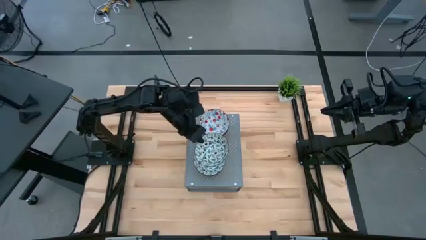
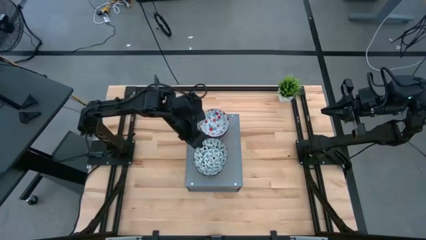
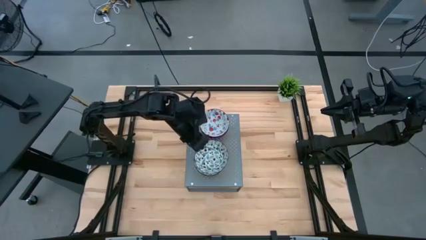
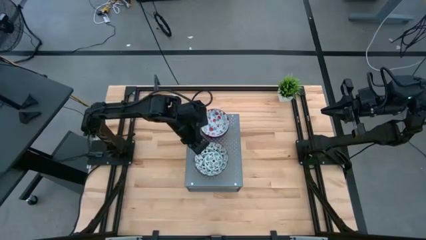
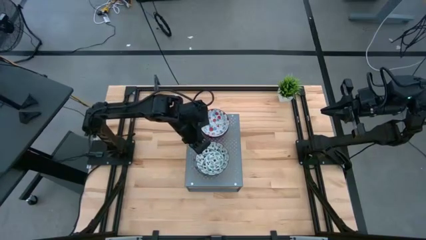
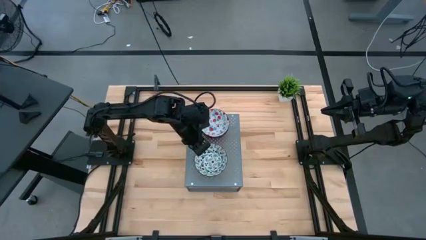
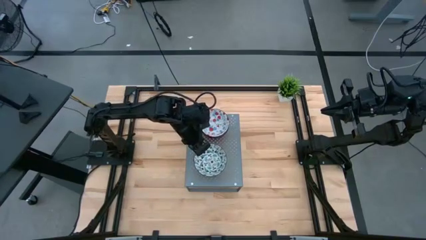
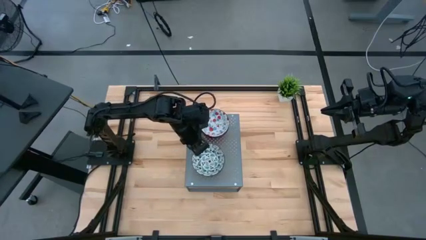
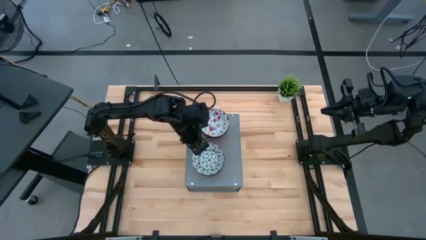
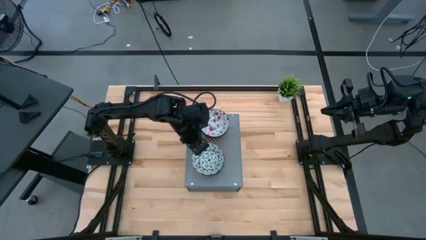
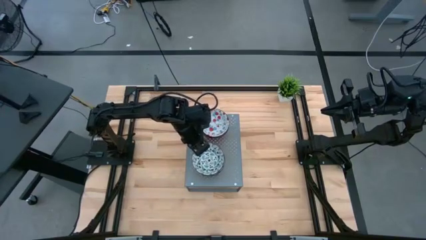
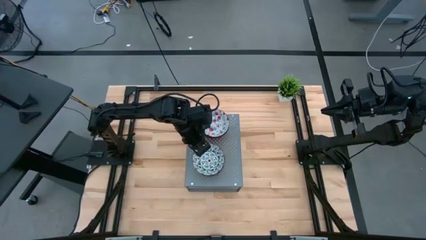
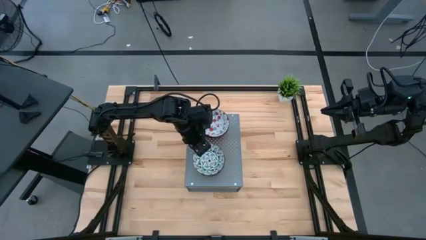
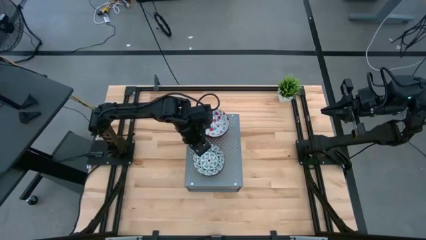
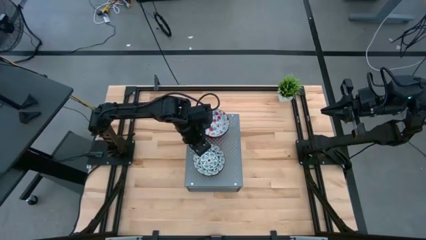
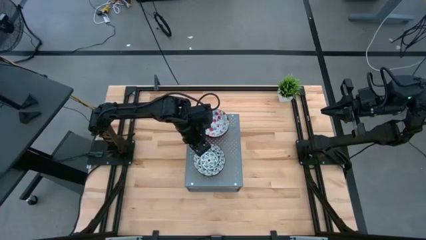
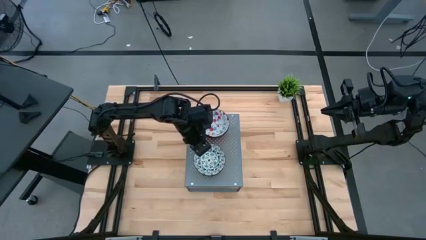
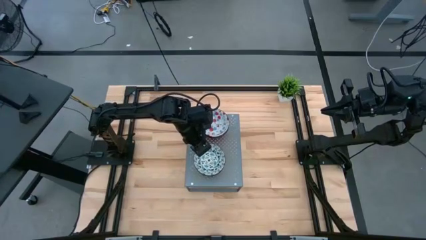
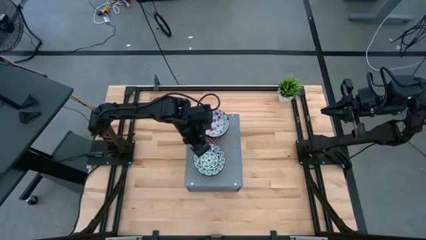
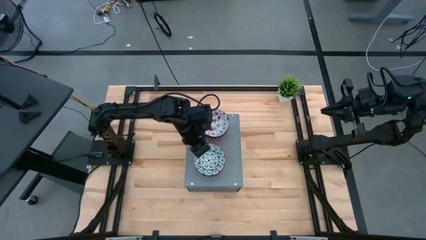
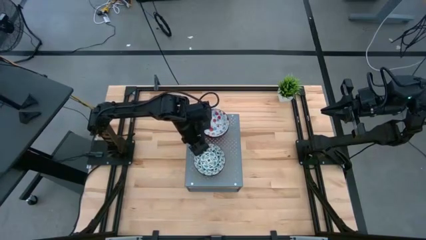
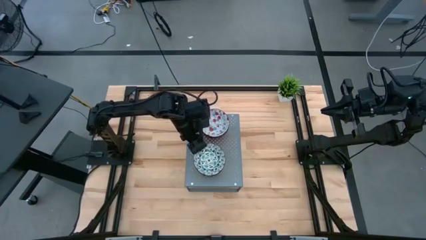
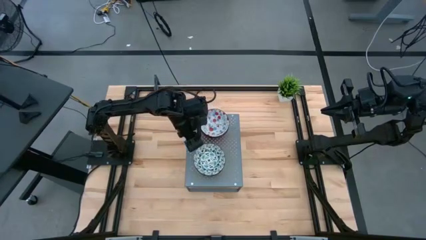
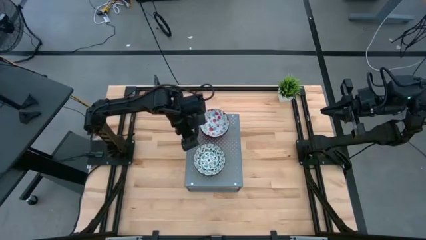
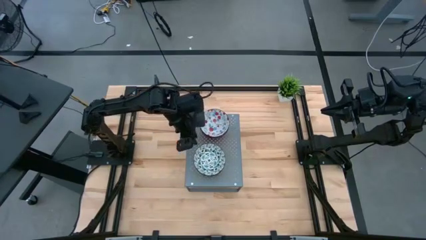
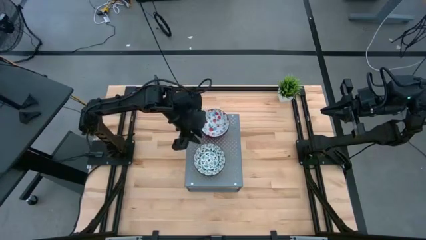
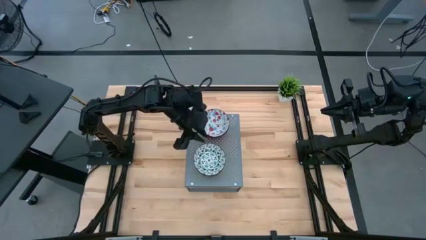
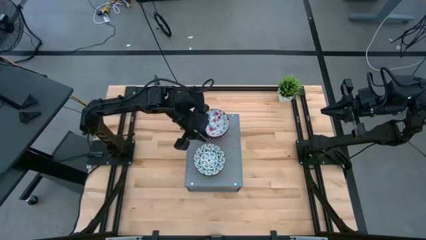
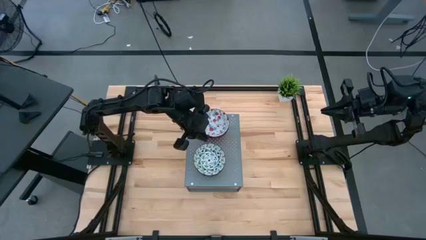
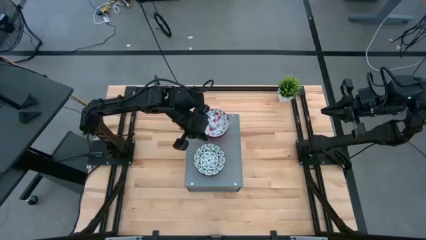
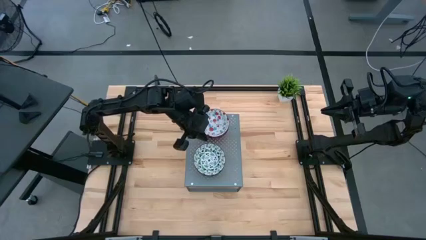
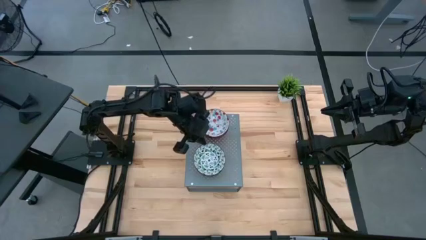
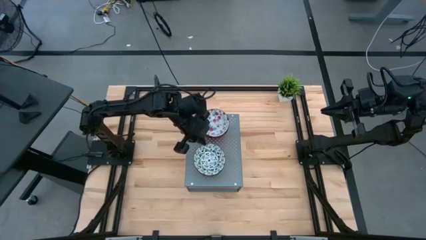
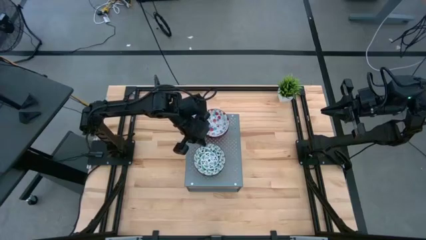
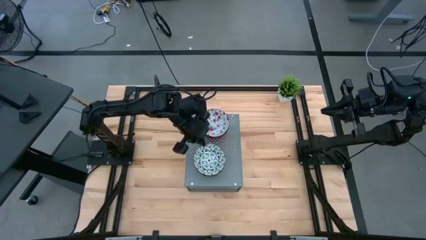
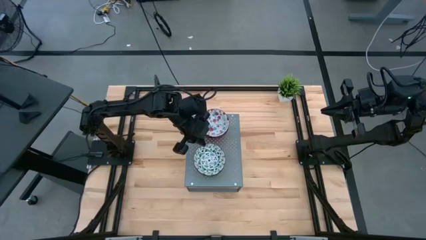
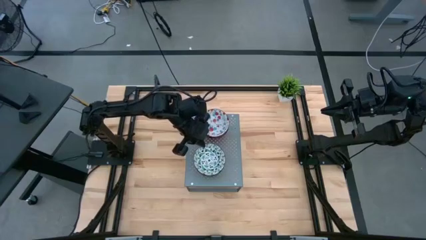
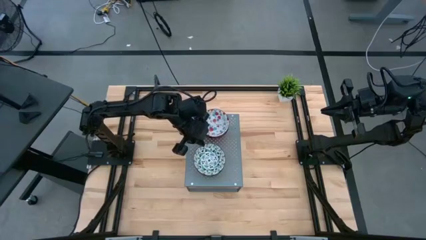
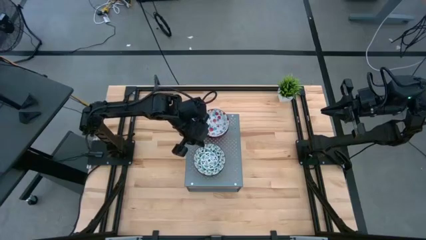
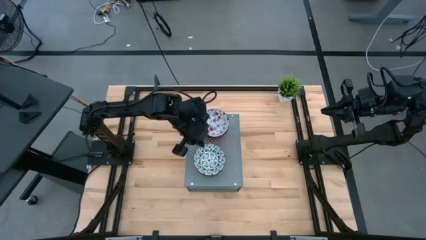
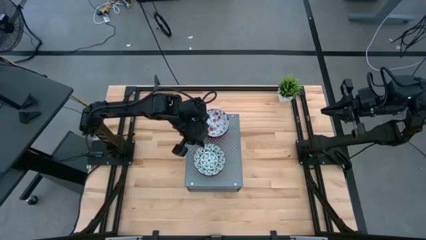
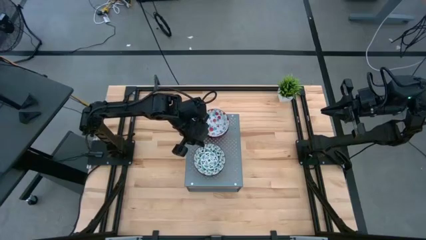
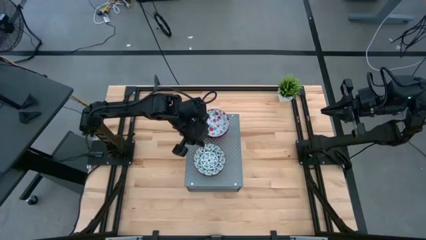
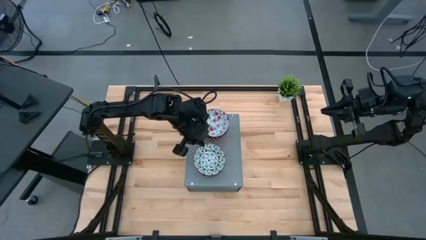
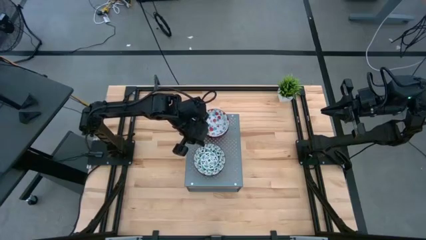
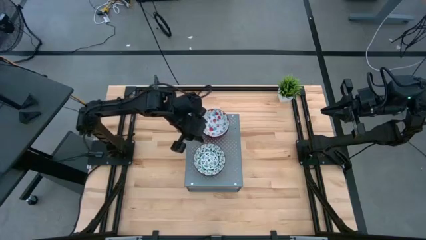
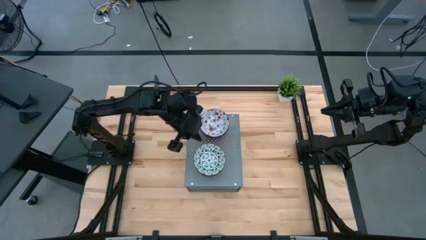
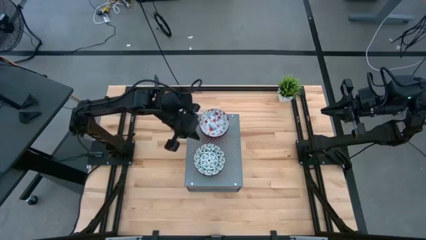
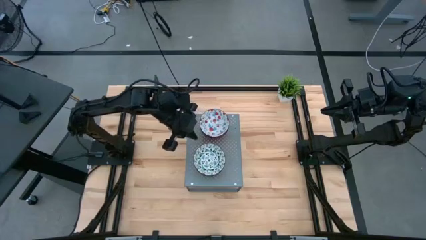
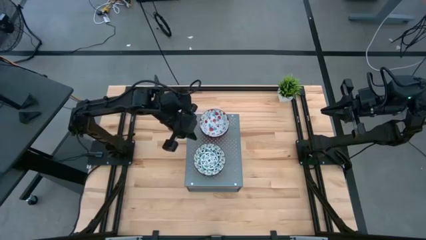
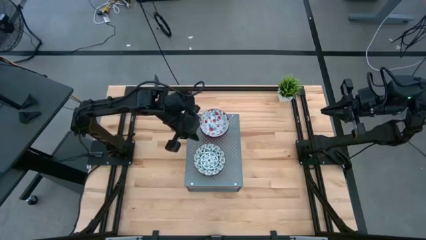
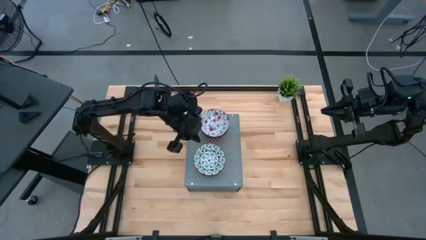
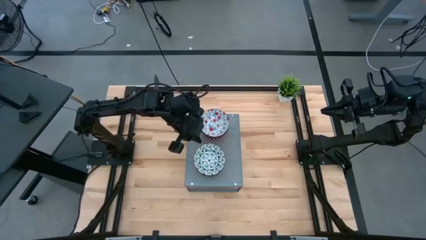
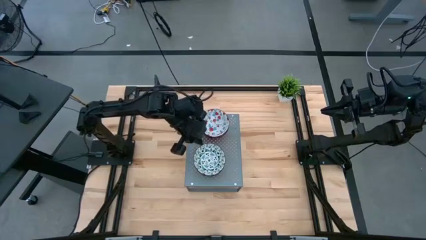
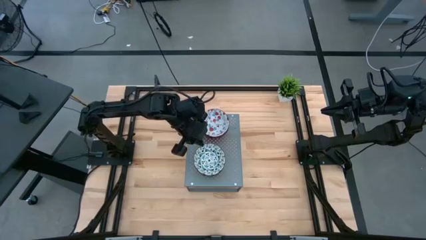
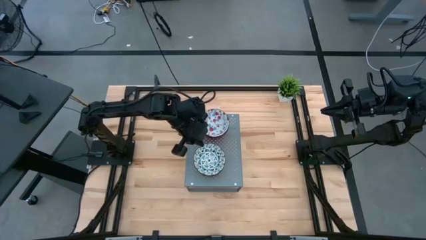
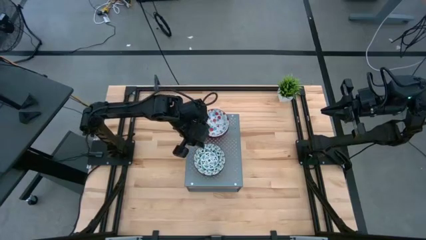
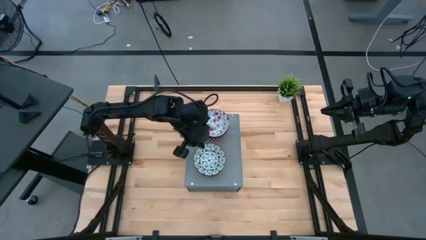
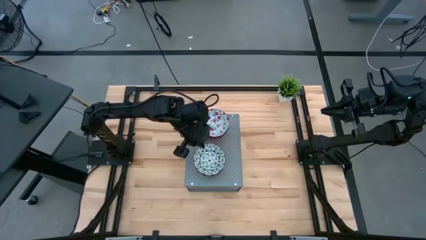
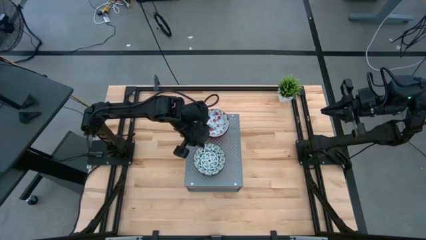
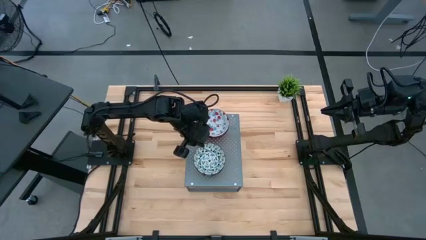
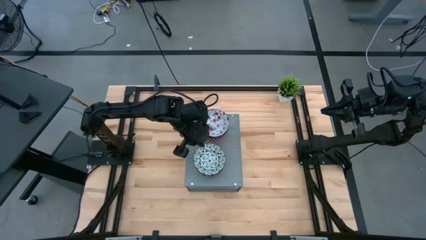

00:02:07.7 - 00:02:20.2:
Task: Pick & Place Mini bowls
Put the green bowl on top of the green bowl on the shelf

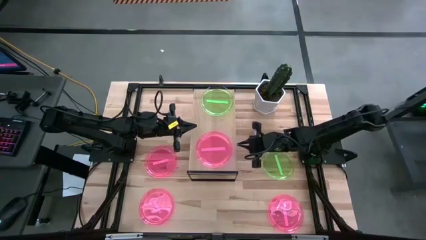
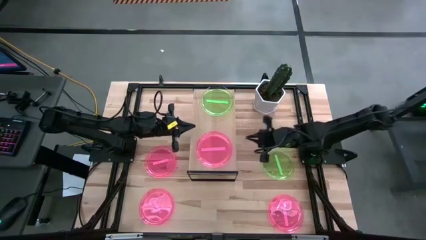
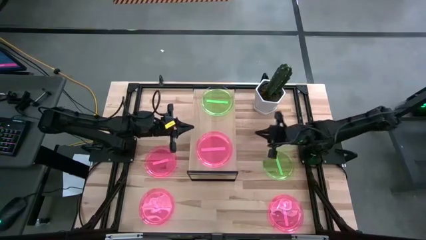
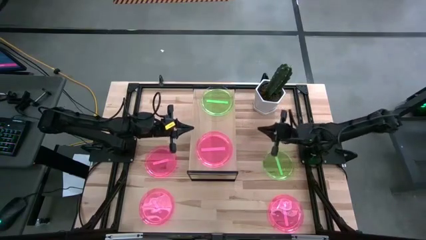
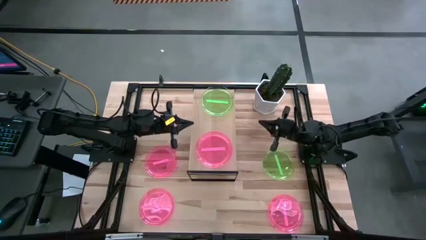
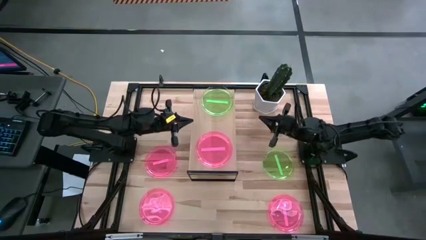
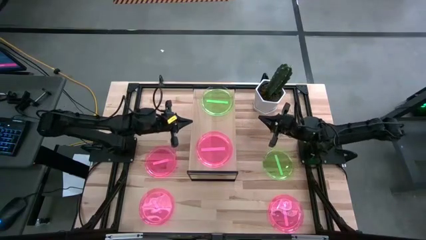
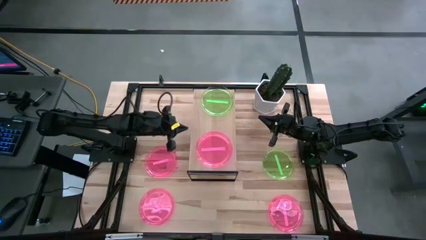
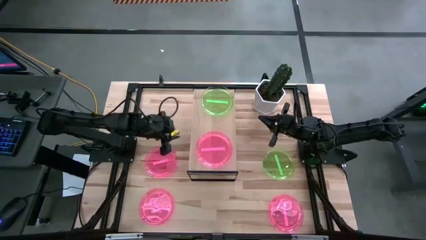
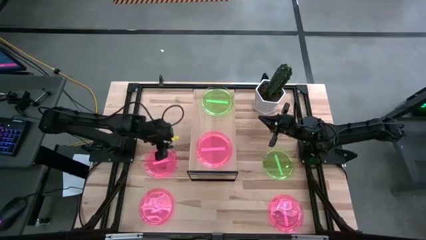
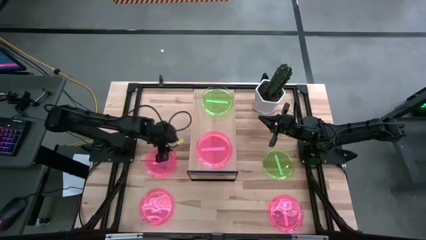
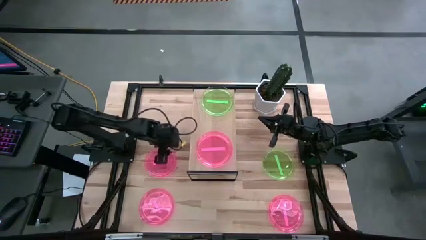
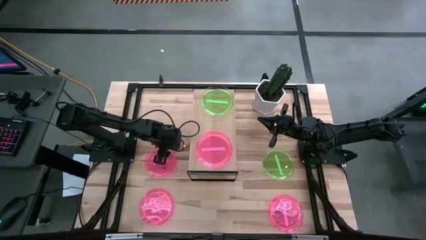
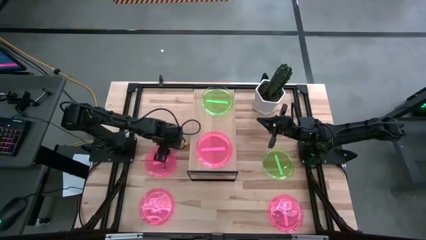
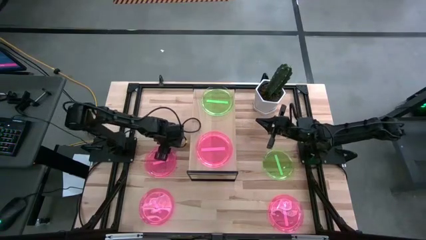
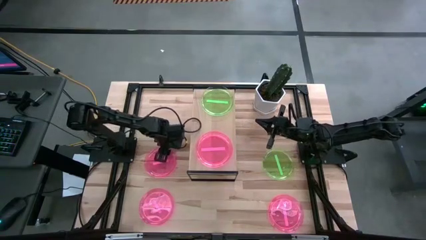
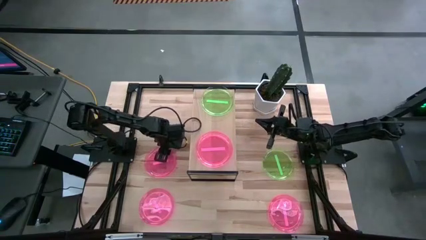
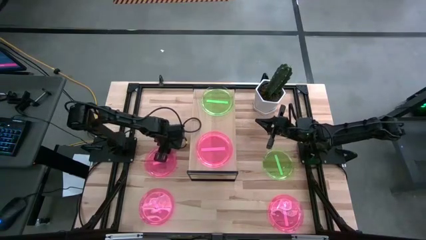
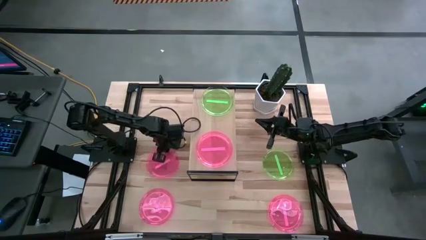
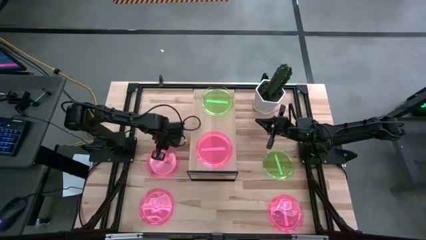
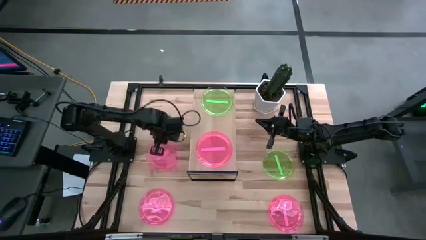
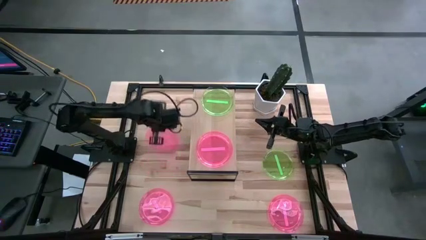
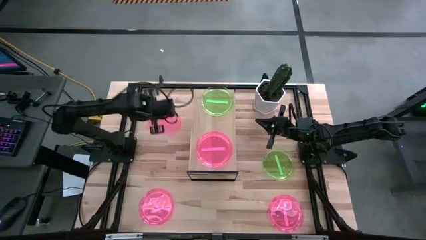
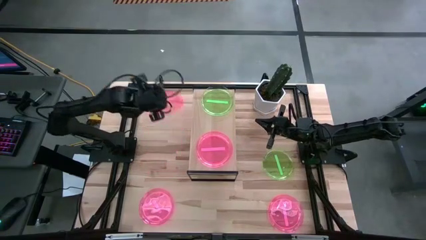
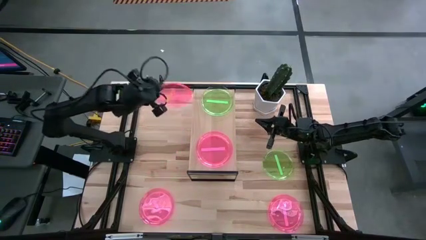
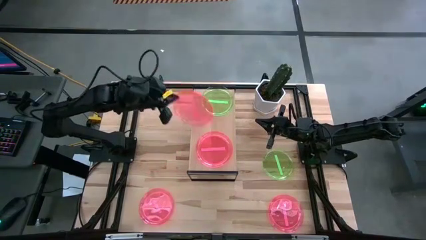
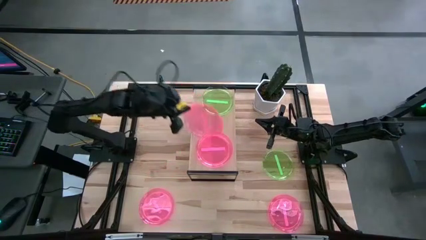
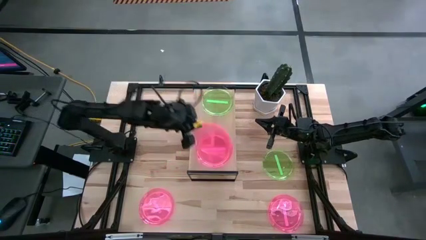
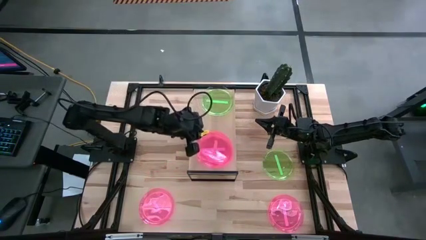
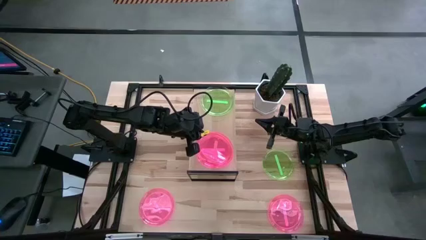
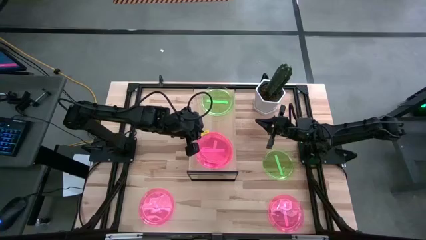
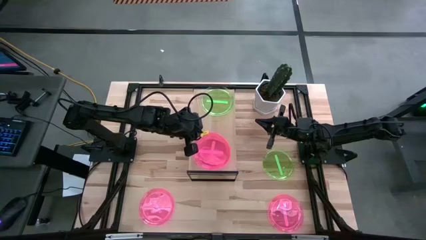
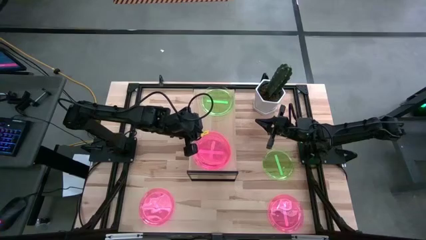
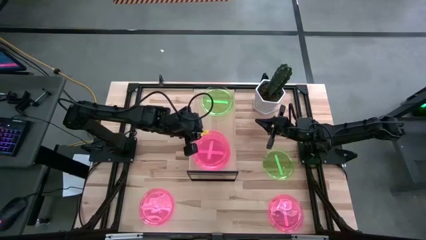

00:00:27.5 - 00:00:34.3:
Task: Place and stack plates onto a shelf
Stack the pink plate on top of the pink plate on the shelf
